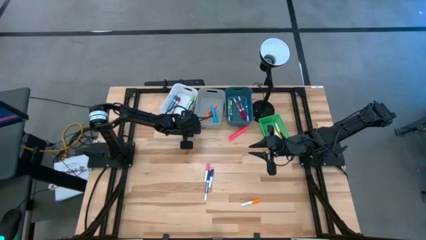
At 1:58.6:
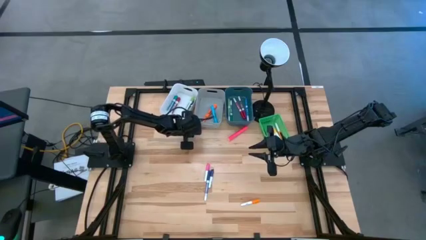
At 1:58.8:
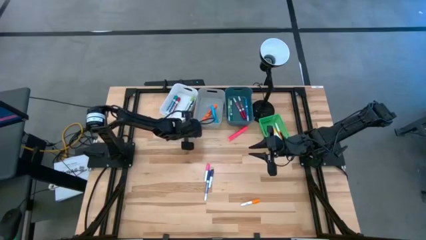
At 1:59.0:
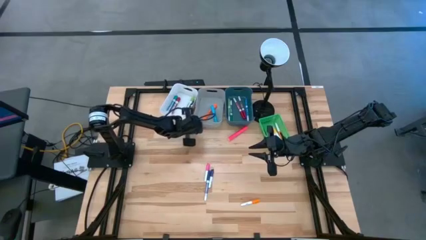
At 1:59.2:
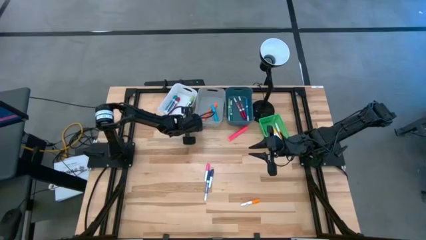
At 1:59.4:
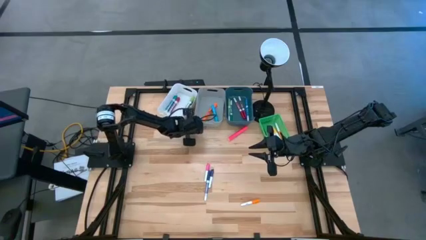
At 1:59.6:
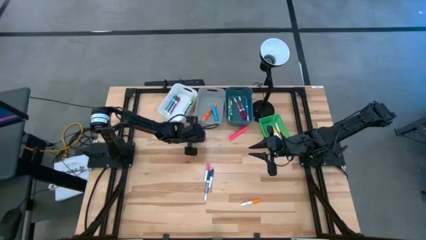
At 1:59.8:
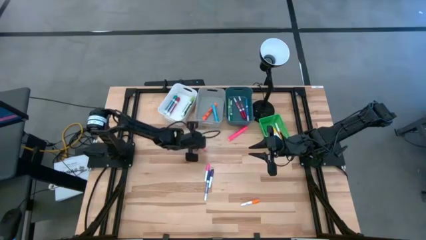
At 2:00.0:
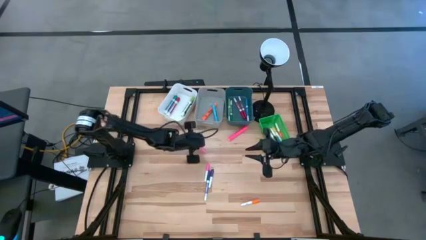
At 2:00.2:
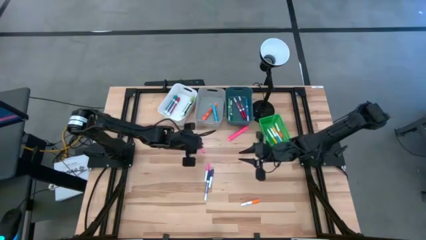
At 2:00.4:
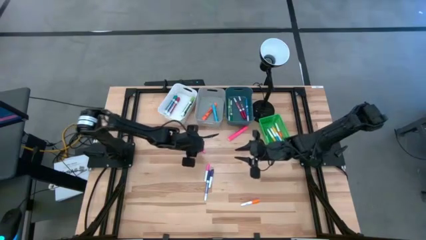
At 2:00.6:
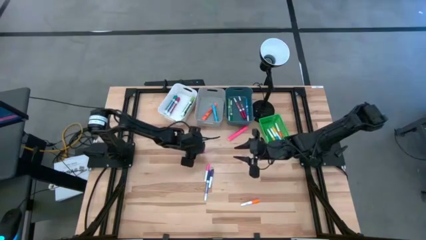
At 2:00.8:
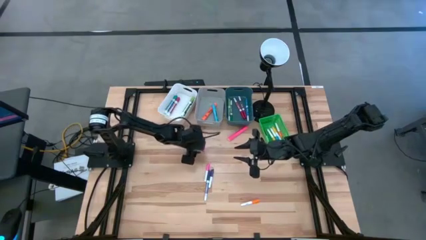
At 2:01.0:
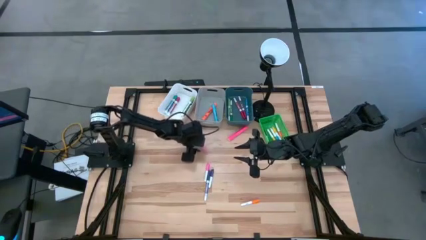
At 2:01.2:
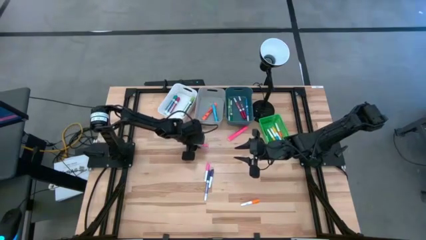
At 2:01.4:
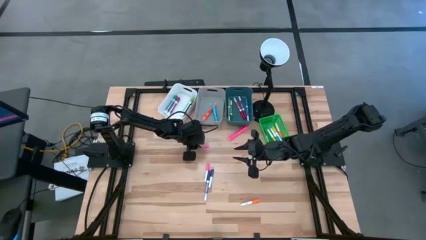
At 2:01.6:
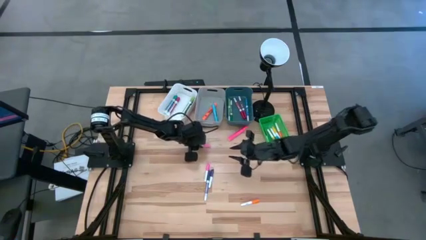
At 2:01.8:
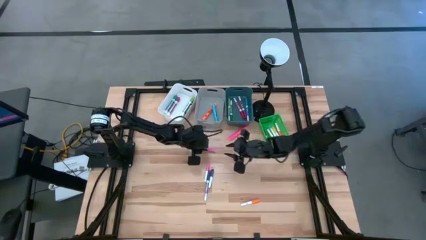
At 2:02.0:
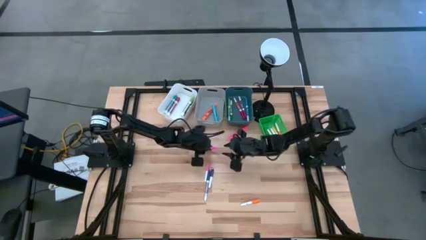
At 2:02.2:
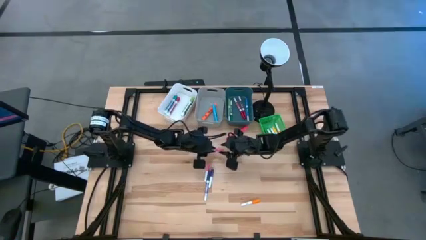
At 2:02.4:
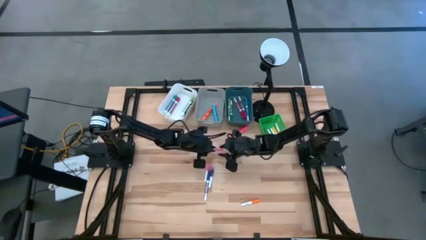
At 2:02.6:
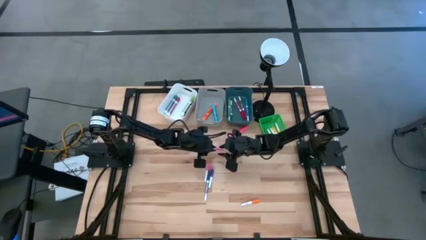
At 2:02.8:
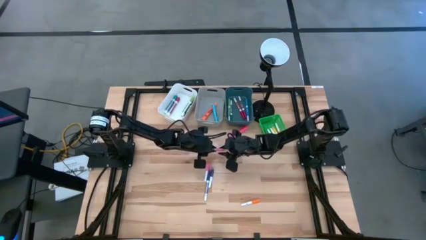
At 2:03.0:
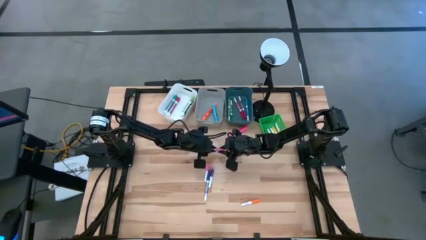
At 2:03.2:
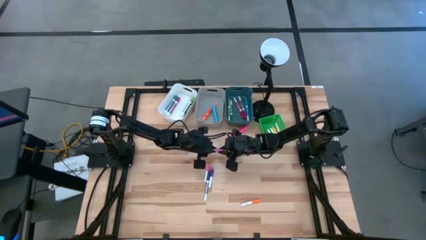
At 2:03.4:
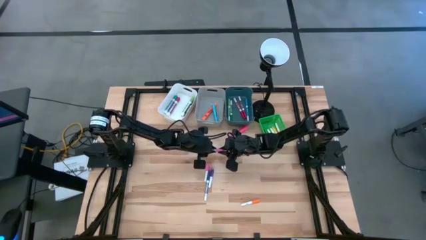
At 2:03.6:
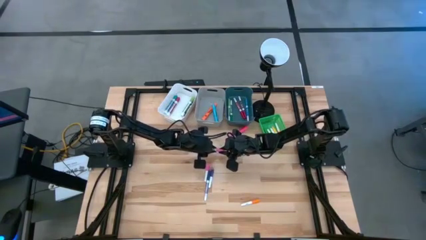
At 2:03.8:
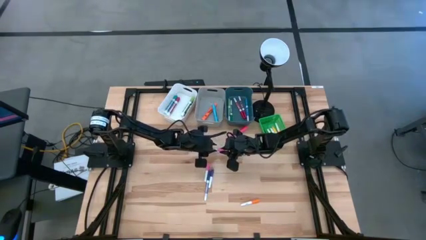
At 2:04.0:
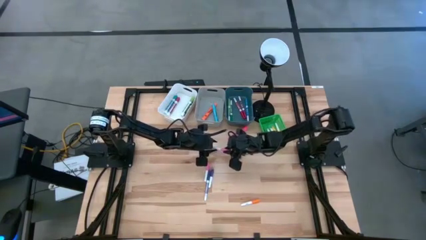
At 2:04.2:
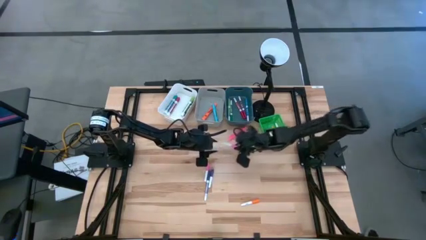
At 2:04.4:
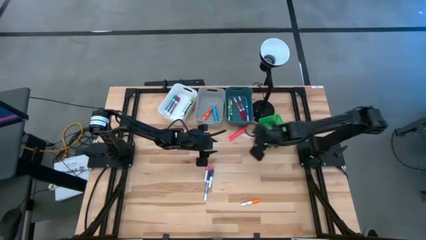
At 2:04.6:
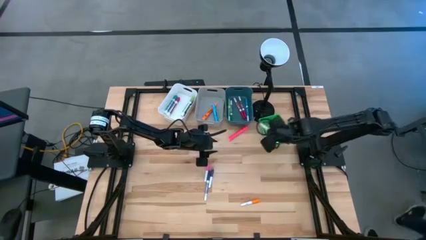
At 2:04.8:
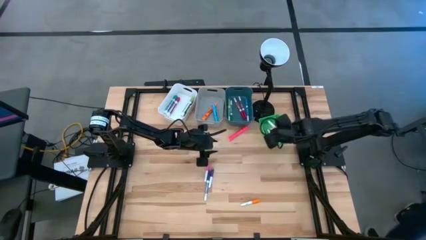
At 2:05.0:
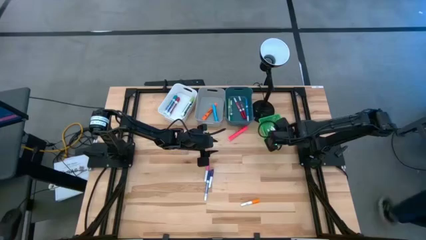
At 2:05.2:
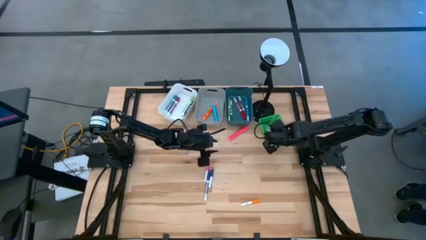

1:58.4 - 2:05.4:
Task: Pick & Place Markers
Put the pink highlighter pen into the green bin

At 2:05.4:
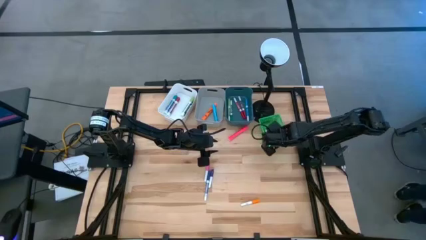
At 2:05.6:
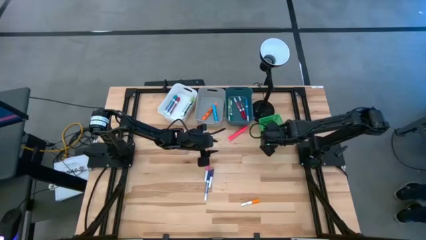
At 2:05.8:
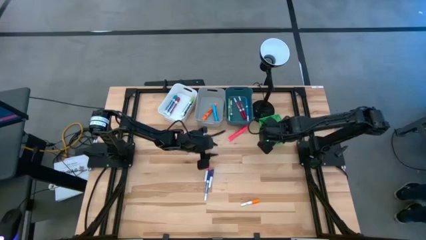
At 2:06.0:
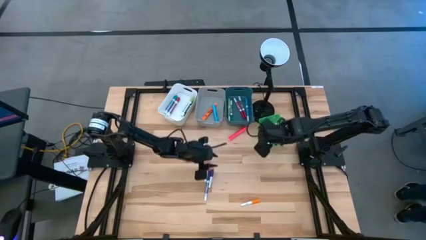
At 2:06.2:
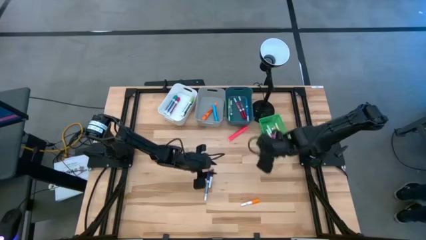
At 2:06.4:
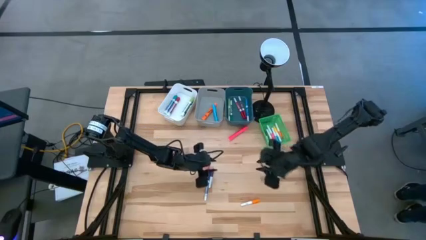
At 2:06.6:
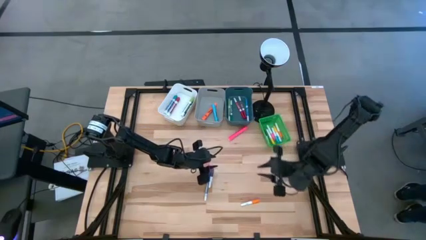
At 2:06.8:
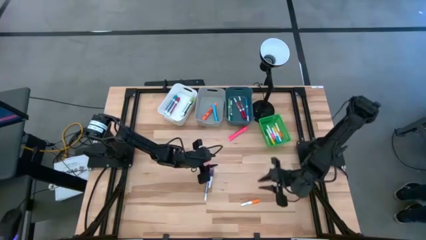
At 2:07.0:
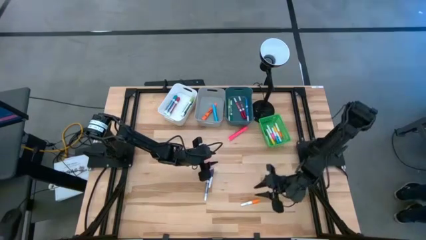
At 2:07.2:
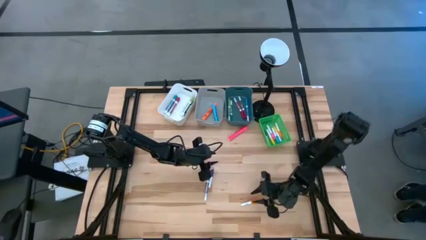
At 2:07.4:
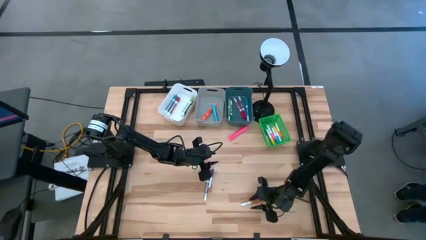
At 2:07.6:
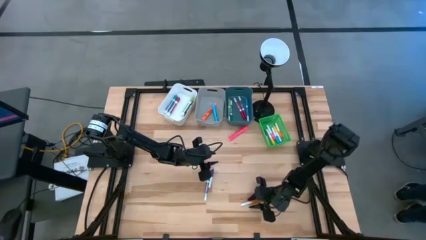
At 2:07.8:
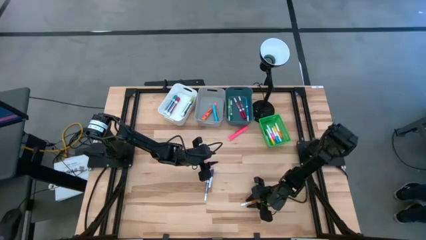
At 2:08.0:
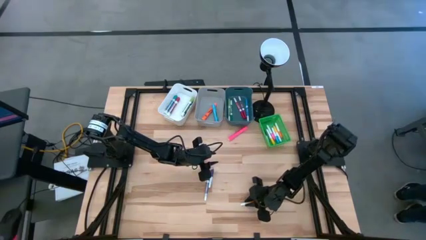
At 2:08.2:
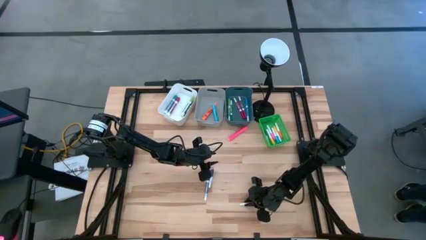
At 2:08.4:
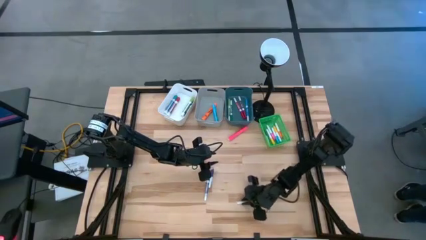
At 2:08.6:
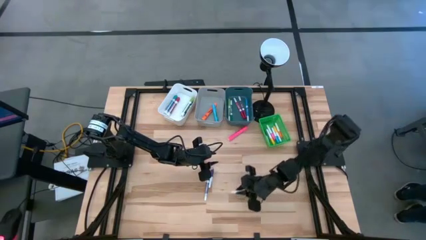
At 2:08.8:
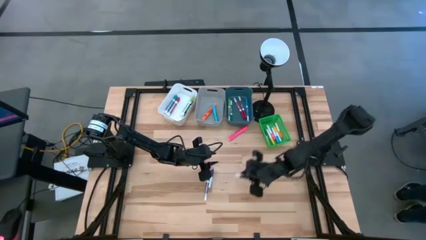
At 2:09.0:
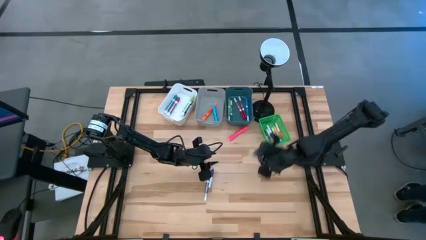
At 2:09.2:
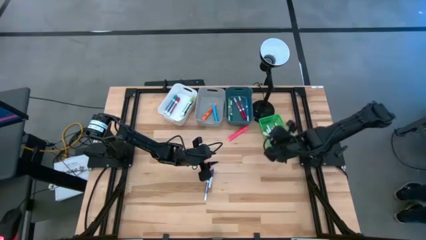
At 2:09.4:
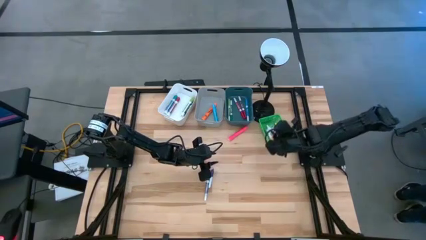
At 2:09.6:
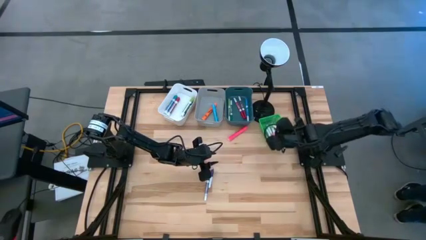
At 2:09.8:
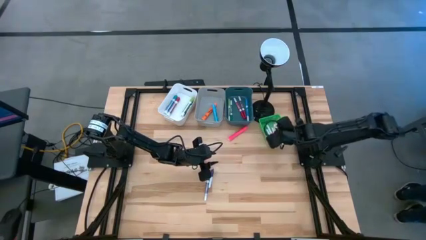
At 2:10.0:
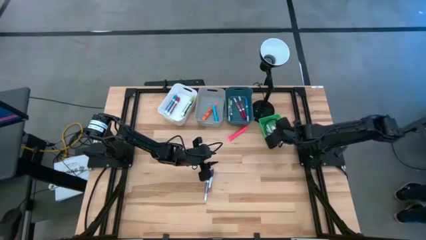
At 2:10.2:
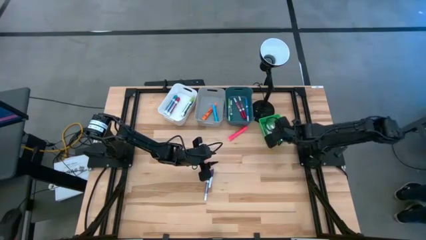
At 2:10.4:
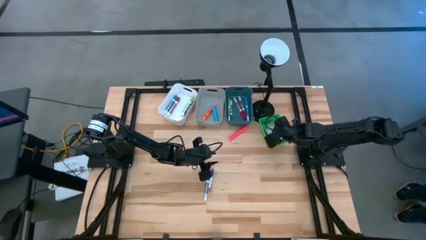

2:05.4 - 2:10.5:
Put the orange highlighter pen into the green bin

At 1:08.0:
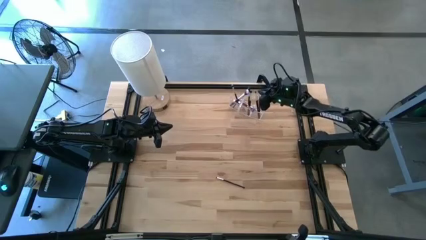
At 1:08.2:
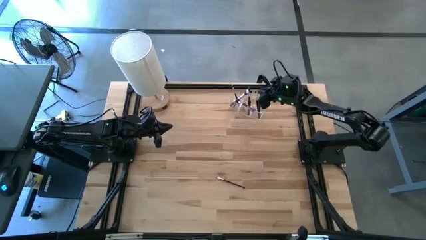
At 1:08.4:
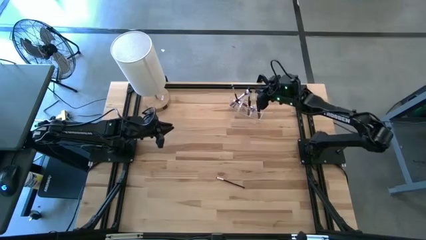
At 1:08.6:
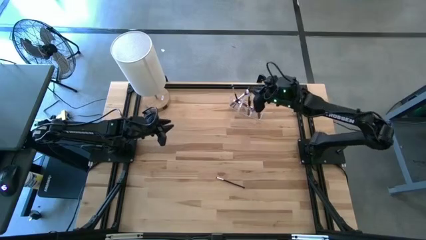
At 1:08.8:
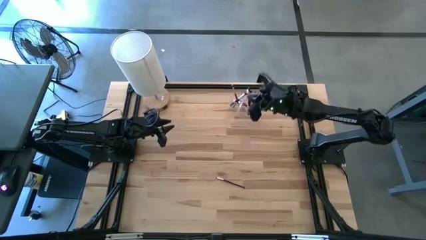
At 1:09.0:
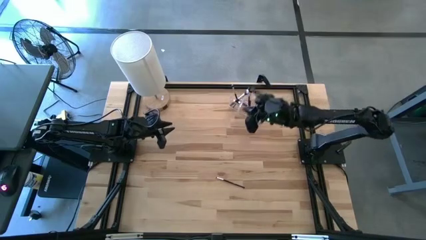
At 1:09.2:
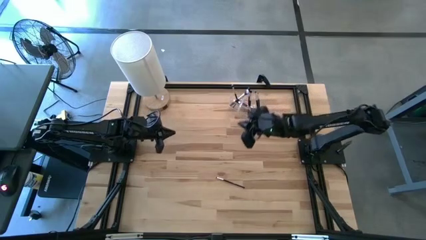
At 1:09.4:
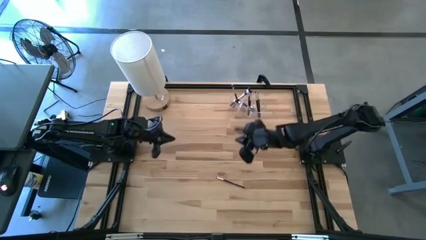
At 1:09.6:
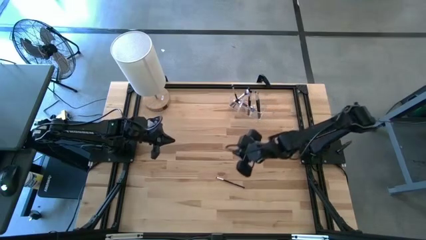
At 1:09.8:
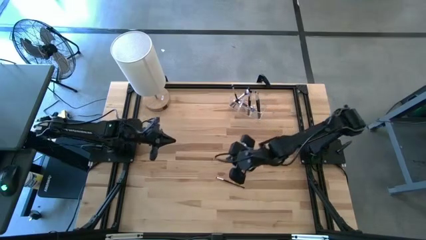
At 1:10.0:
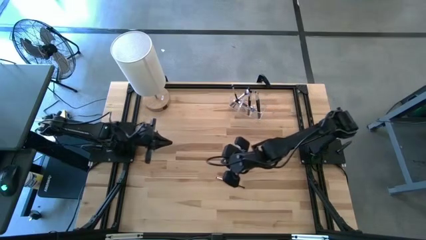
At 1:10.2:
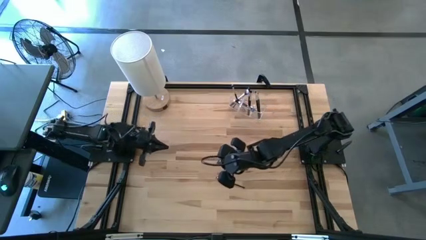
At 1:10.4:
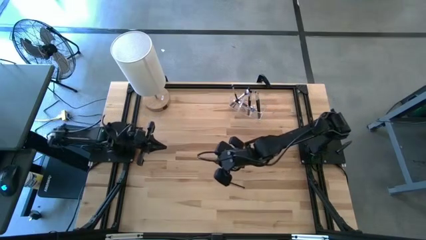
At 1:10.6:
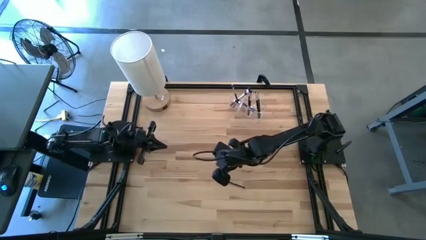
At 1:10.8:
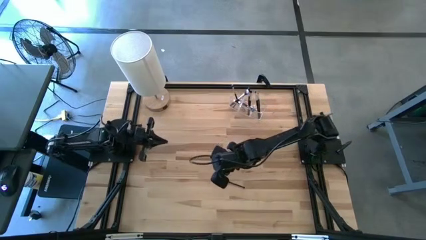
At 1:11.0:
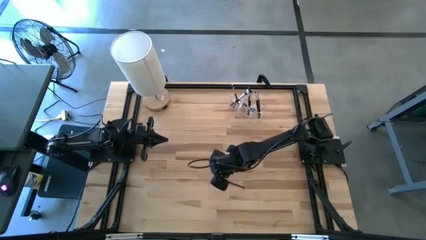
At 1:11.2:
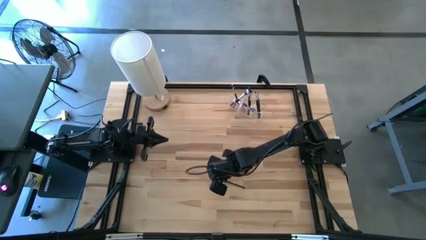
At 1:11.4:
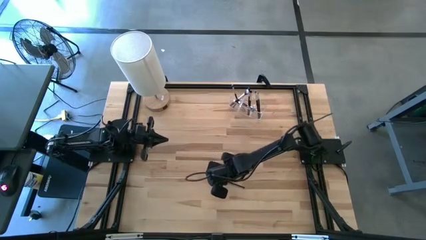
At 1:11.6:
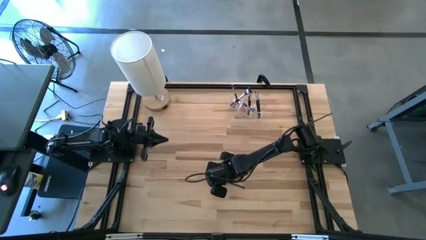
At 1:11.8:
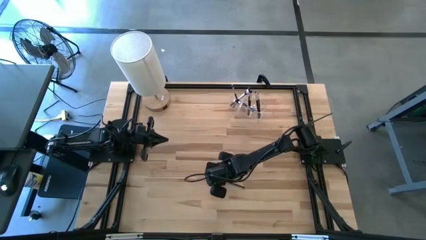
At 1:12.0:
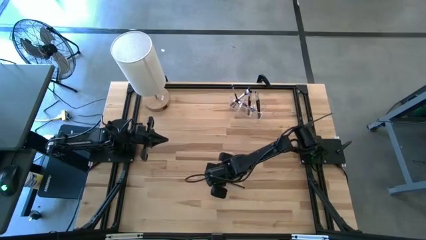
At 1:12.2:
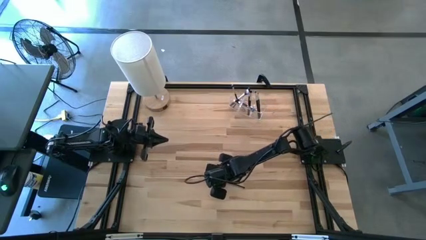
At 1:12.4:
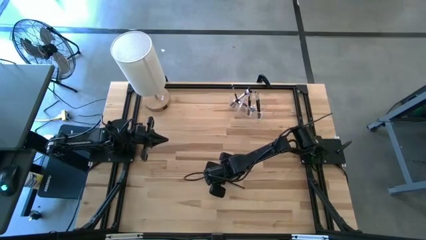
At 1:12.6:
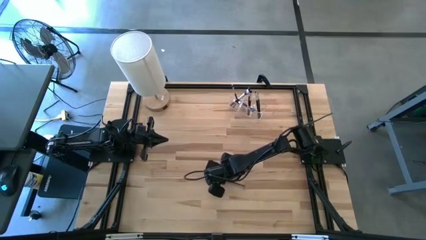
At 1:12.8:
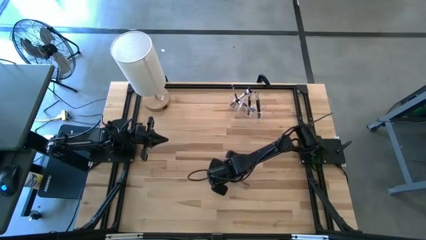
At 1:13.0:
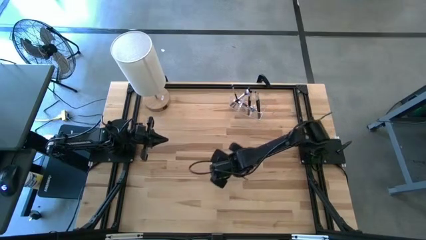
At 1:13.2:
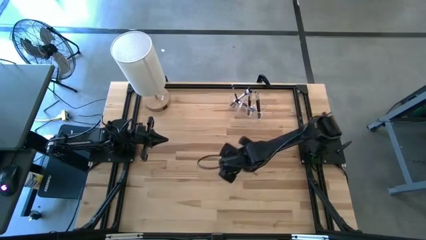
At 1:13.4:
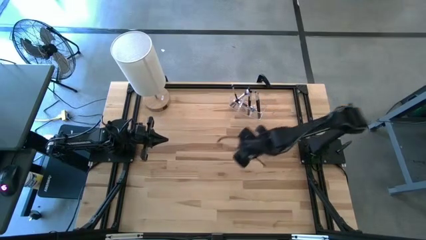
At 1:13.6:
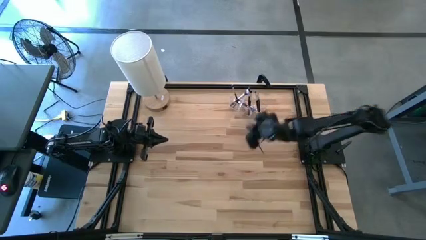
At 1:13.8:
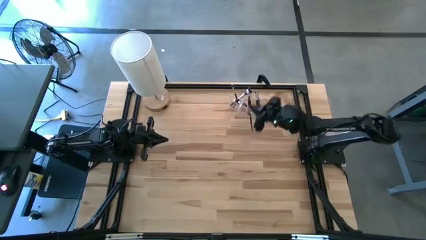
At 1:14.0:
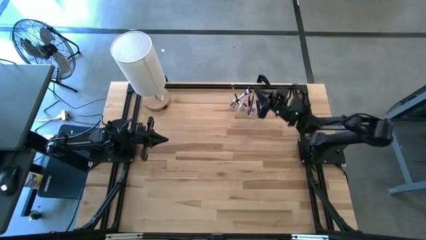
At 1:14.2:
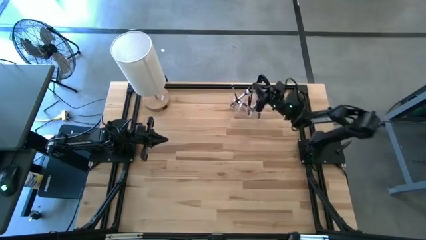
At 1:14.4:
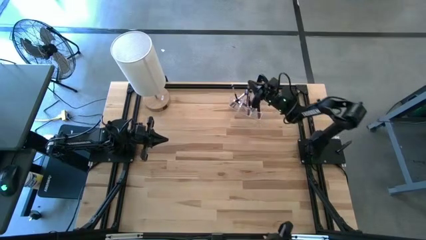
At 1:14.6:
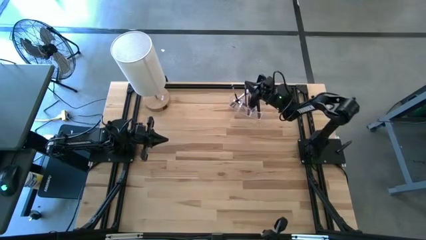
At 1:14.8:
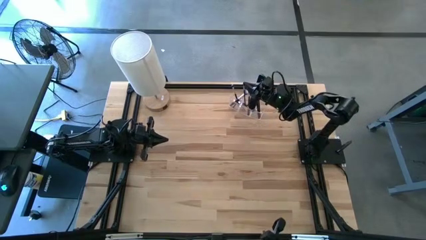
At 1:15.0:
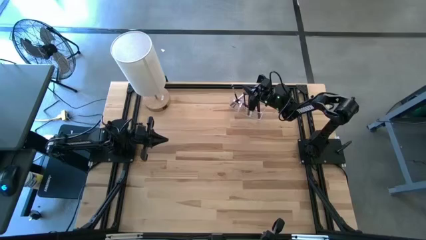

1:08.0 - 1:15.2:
Task: Pick & Place Makeup Brushes
Put the black makeup brush into the transparent organizer
